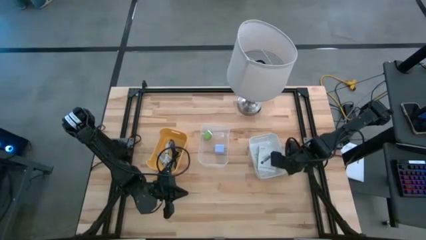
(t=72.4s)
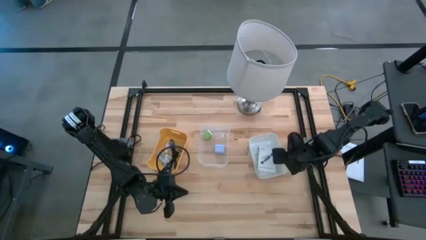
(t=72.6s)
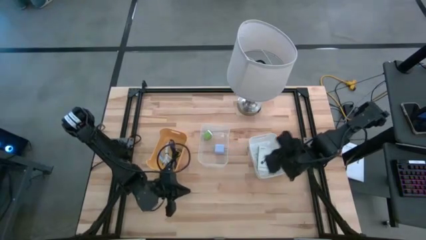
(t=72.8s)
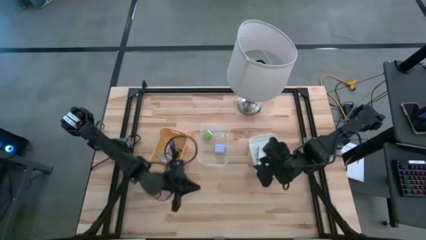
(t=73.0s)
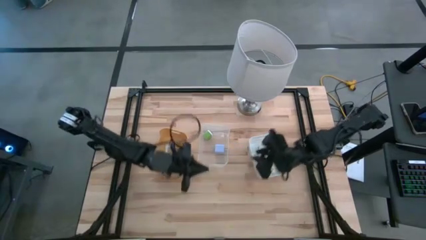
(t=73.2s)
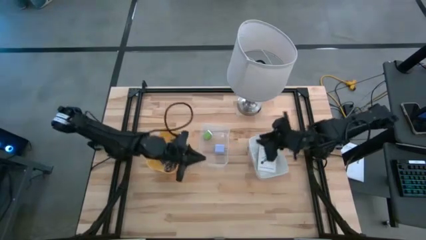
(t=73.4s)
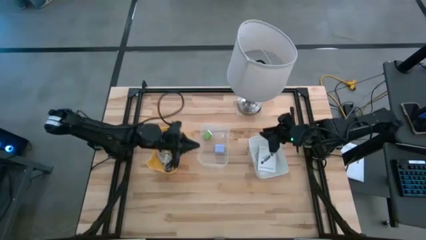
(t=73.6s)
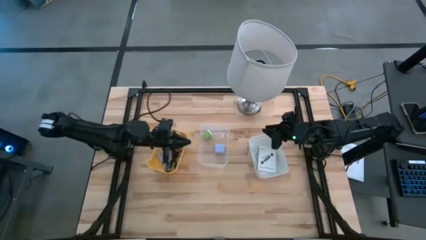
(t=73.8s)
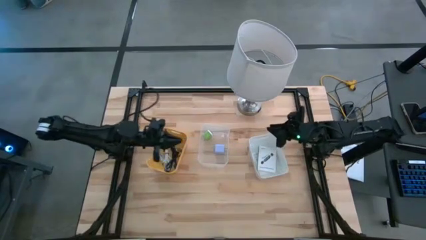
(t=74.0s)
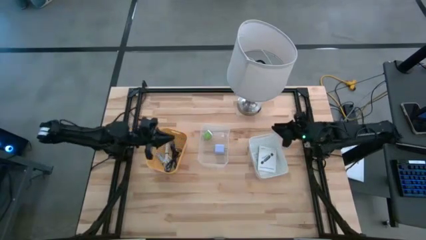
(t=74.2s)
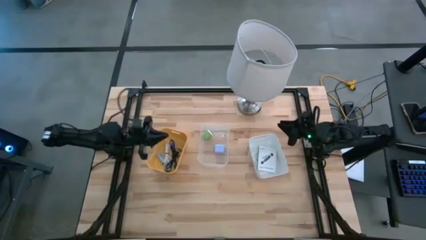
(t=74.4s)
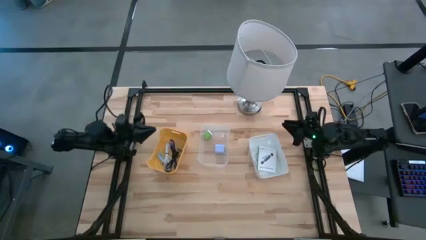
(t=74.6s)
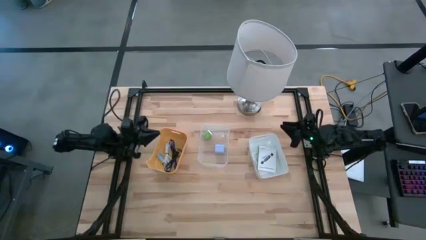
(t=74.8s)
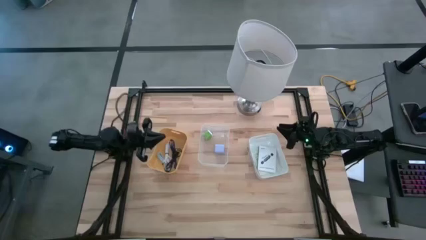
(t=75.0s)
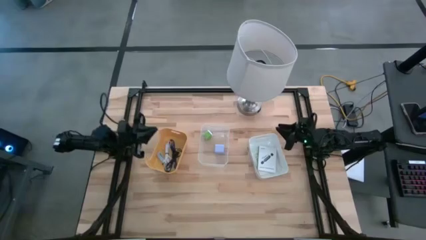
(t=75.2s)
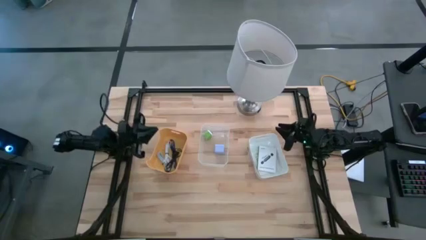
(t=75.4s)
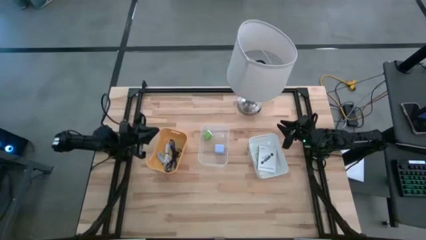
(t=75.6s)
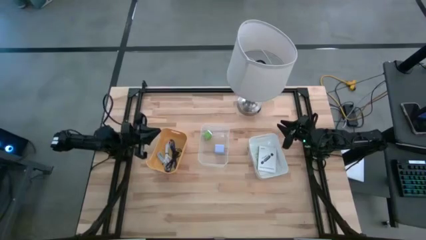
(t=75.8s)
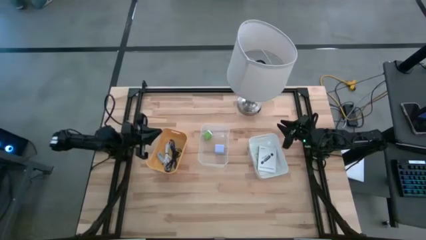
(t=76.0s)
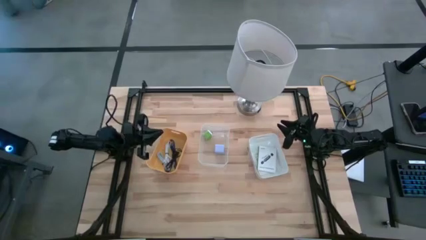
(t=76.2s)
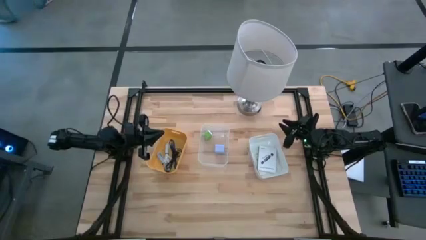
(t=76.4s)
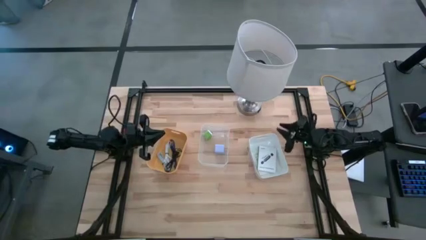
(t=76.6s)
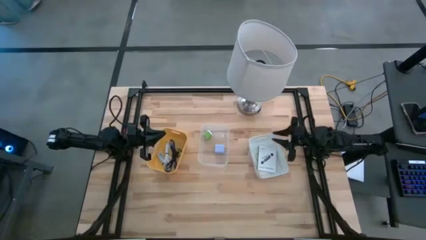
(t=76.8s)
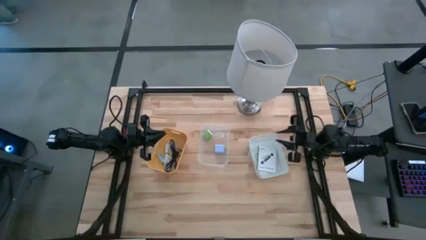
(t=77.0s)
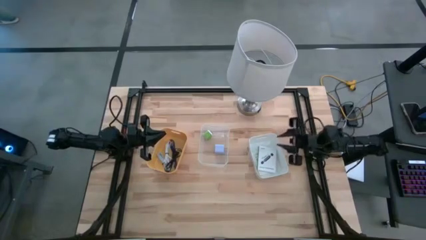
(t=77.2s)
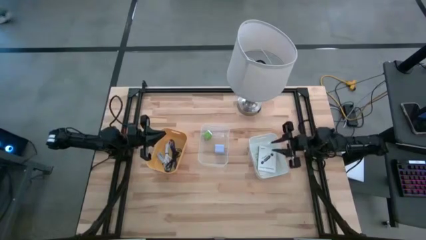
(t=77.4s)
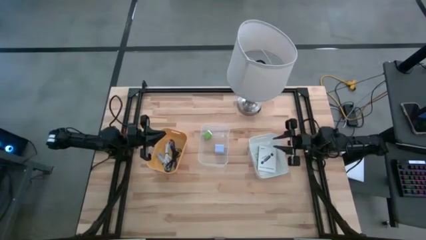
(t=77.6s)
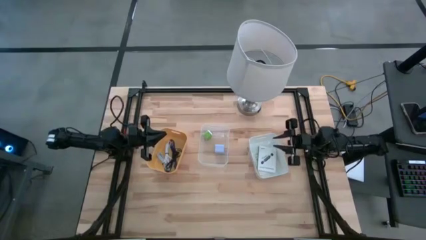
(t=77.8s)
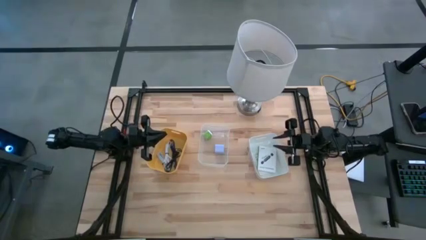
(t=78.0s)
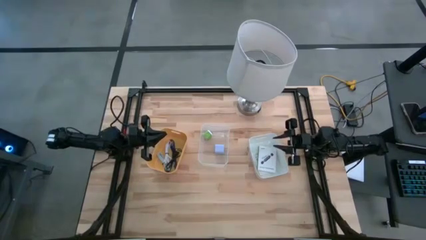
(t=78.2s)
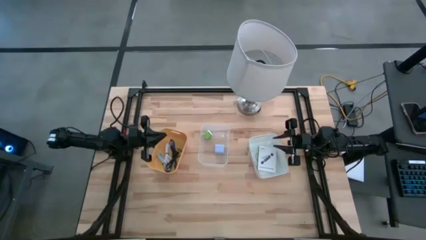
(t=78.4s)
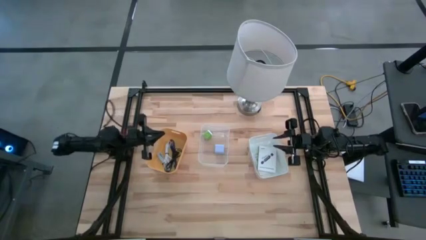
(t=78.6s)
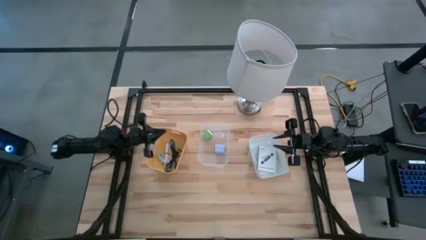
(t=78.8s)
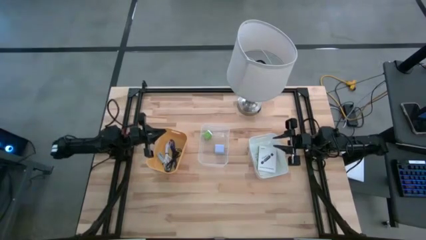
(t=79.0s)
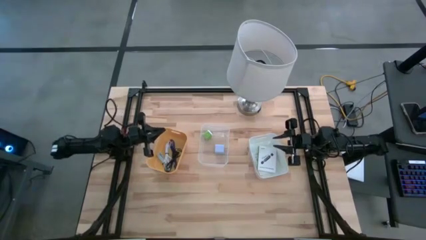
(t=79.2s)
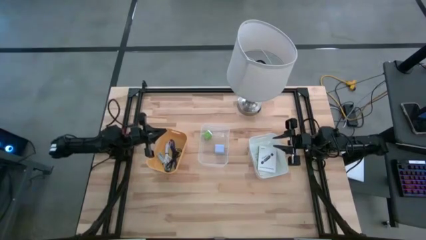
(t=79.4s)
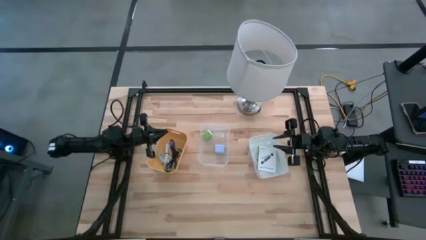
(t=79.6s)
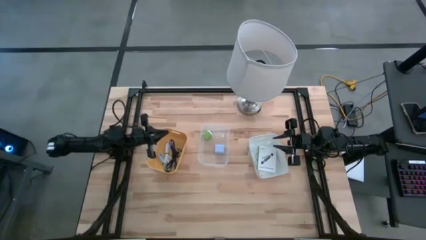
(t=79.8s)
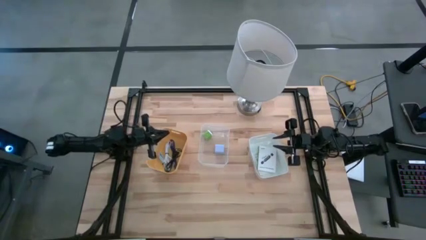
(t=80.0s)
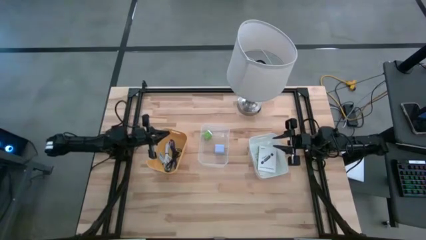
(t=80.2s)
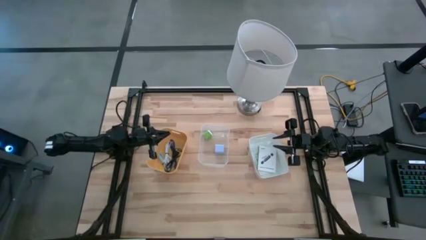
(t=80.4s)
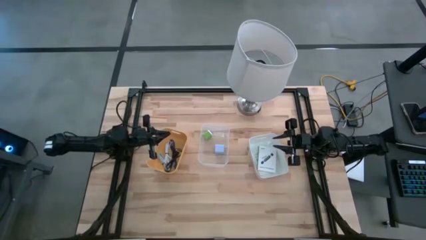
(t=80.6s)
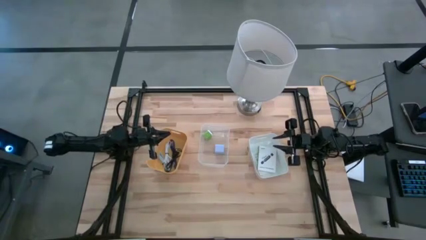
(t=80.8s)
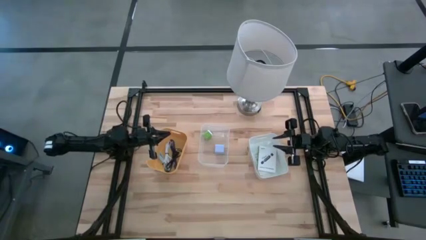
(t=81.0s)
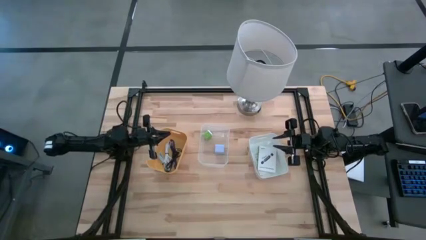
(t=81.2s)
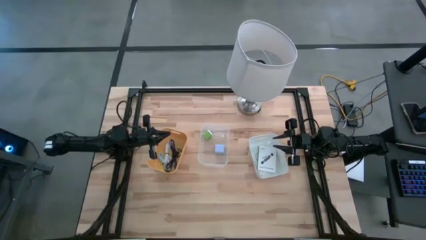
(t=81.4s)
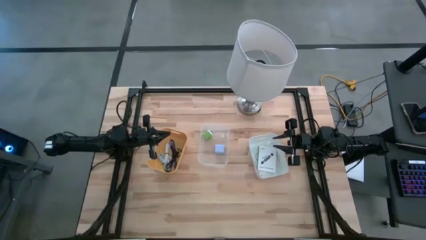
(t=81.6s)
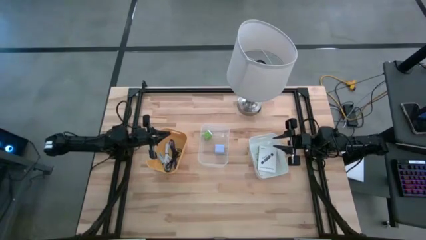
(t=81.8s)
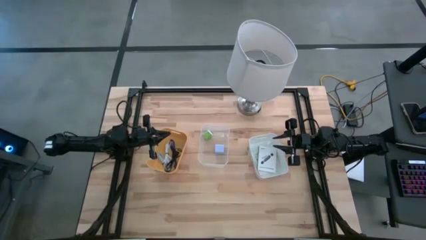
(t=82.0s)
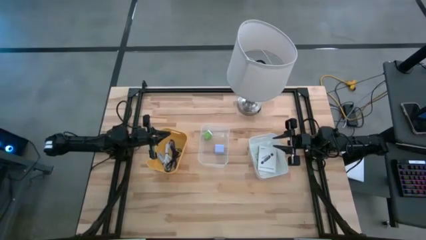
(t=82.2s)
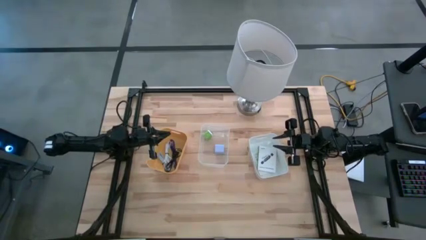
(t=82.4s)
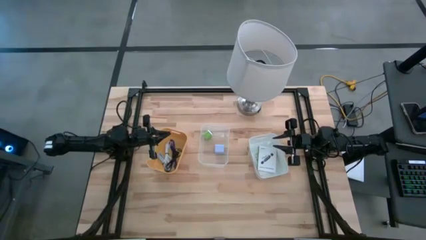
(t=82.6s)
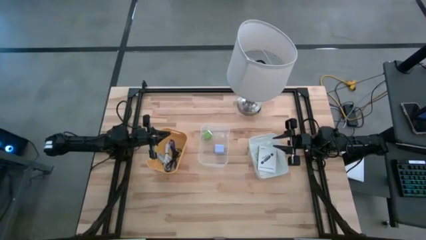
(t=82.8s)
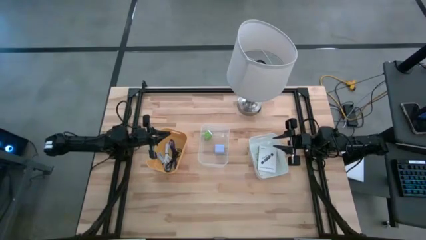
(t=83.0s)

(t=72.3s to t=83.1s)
Task: Pick and place items into bin
Return to Home Position
